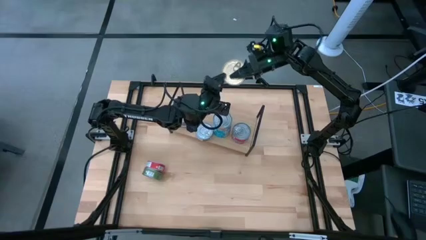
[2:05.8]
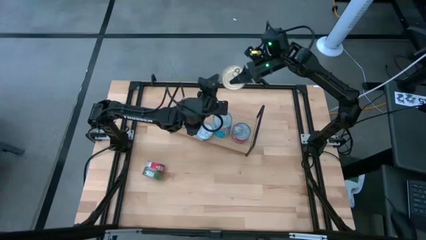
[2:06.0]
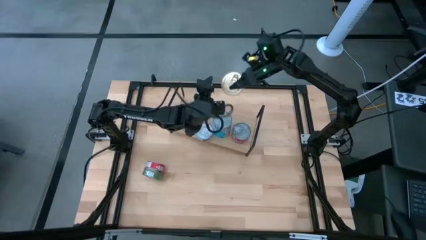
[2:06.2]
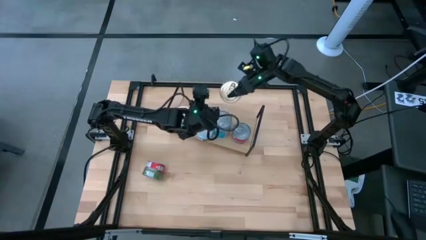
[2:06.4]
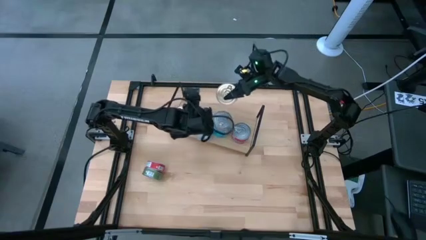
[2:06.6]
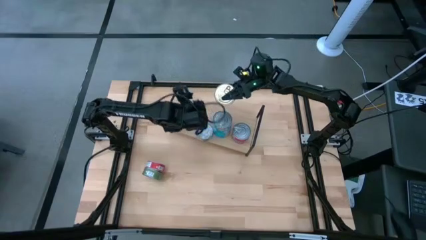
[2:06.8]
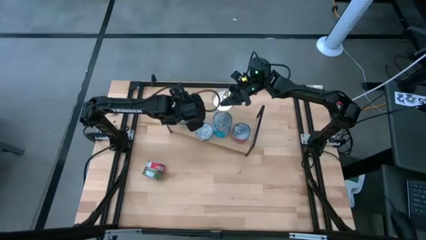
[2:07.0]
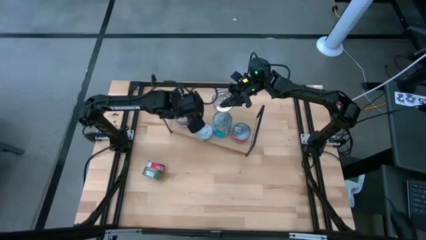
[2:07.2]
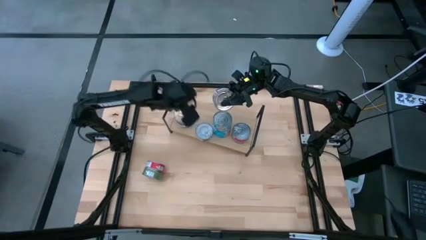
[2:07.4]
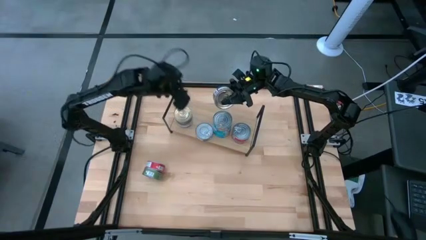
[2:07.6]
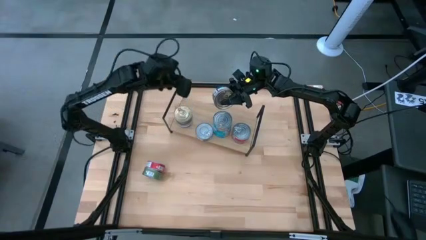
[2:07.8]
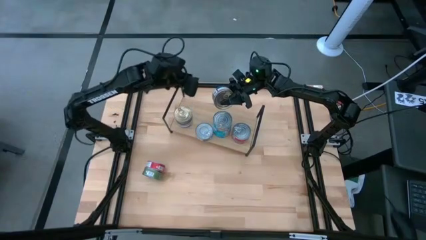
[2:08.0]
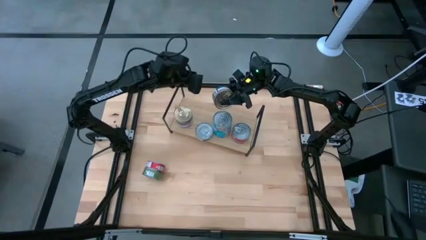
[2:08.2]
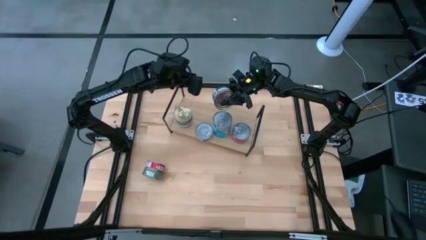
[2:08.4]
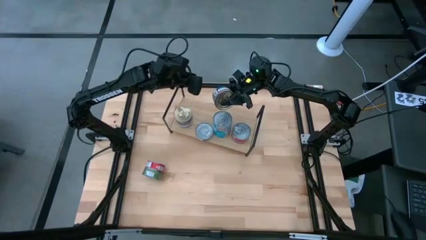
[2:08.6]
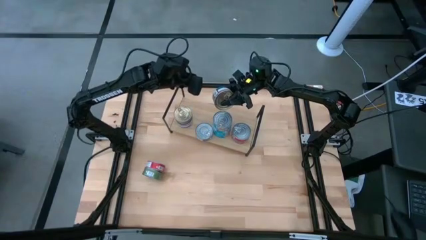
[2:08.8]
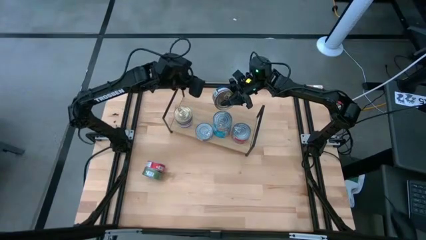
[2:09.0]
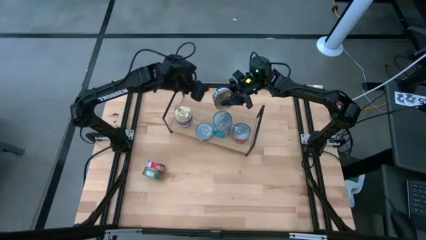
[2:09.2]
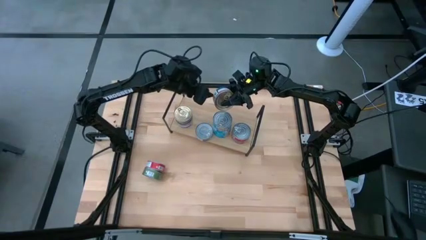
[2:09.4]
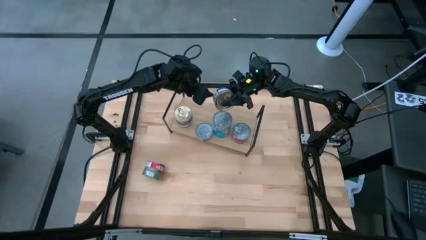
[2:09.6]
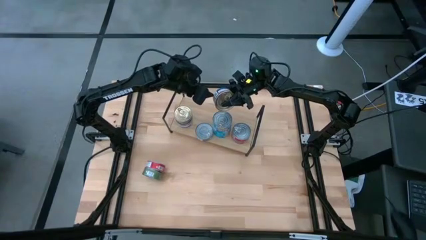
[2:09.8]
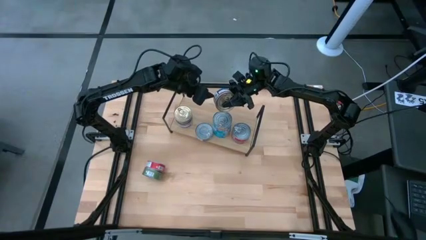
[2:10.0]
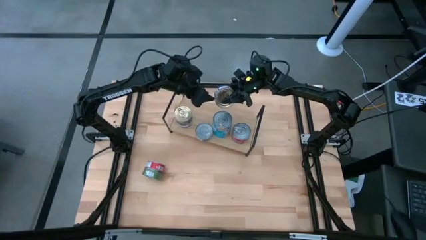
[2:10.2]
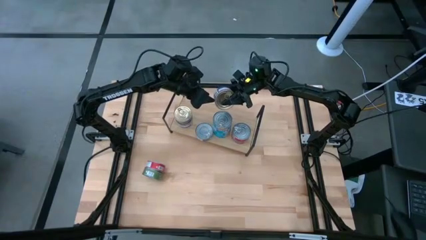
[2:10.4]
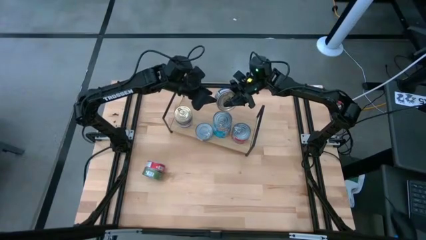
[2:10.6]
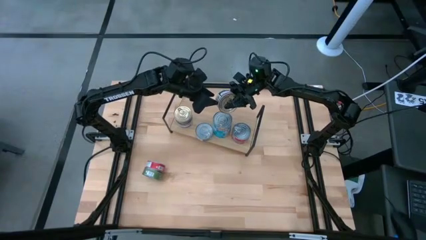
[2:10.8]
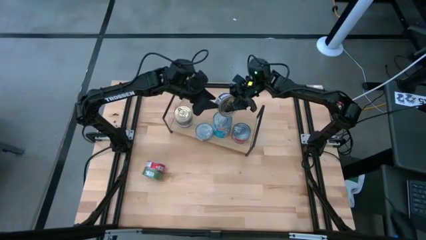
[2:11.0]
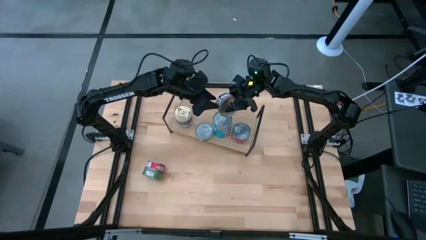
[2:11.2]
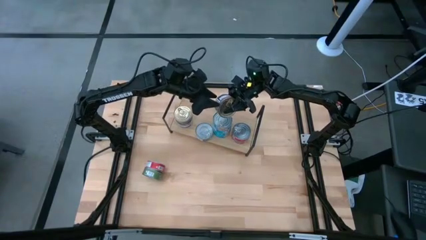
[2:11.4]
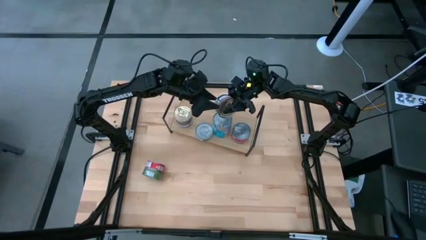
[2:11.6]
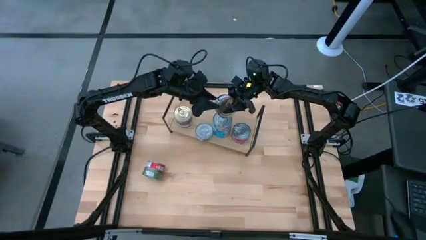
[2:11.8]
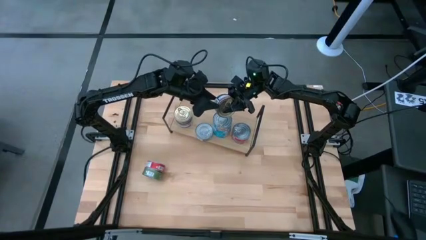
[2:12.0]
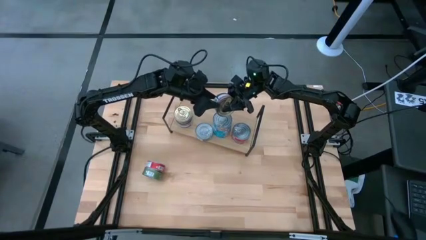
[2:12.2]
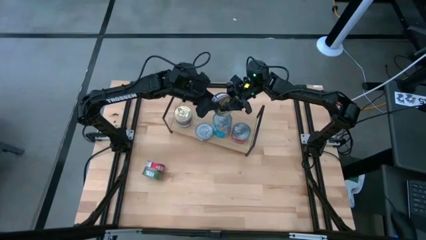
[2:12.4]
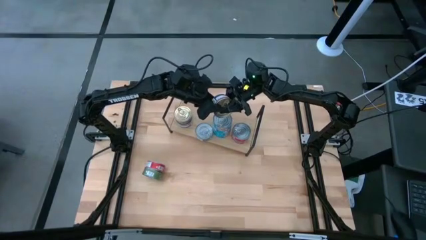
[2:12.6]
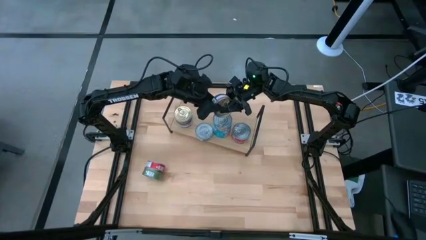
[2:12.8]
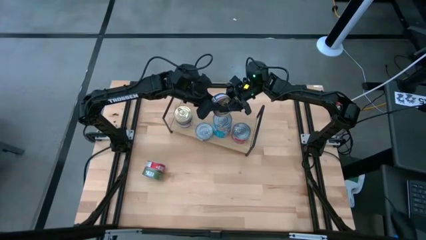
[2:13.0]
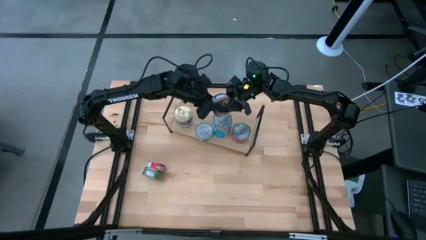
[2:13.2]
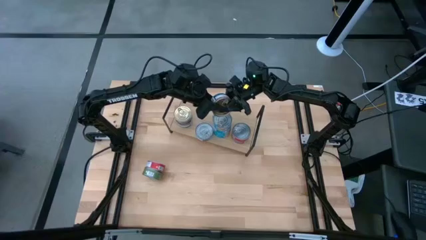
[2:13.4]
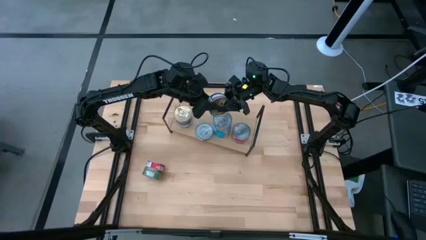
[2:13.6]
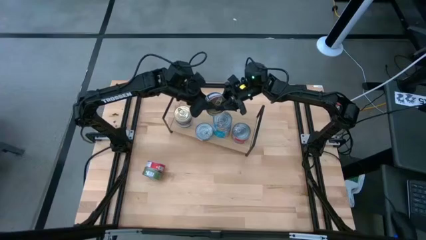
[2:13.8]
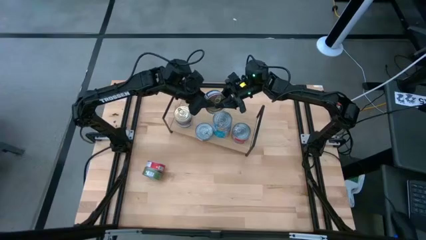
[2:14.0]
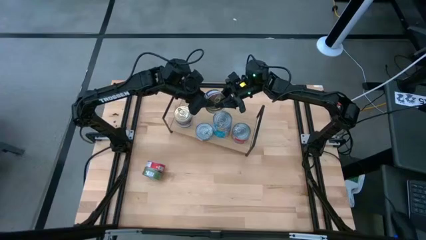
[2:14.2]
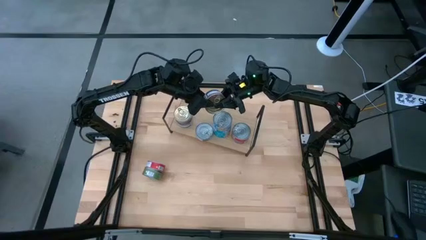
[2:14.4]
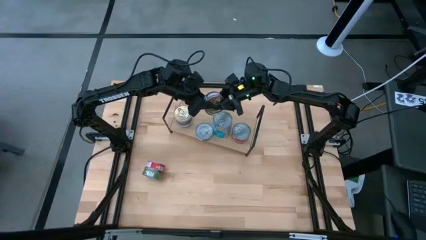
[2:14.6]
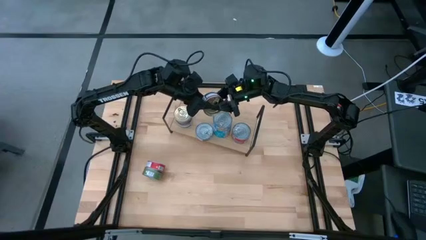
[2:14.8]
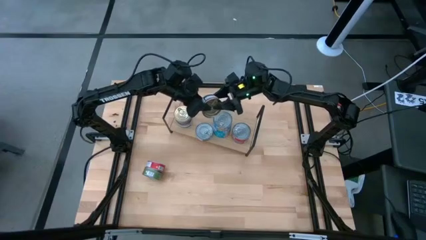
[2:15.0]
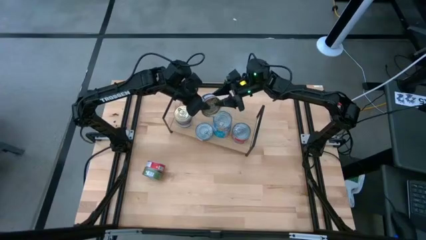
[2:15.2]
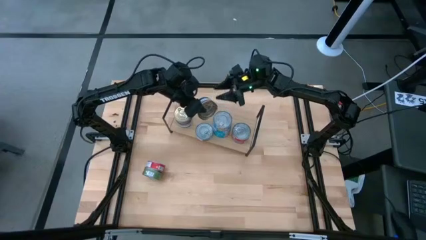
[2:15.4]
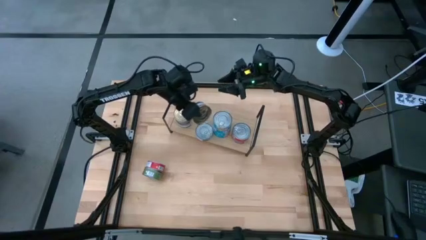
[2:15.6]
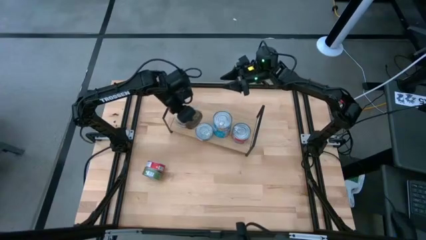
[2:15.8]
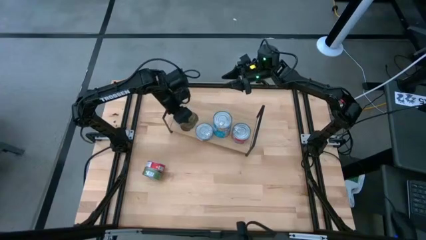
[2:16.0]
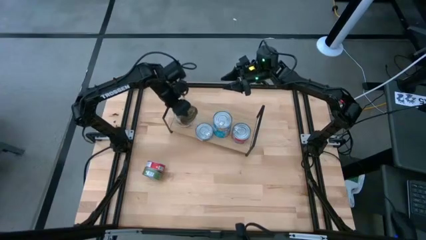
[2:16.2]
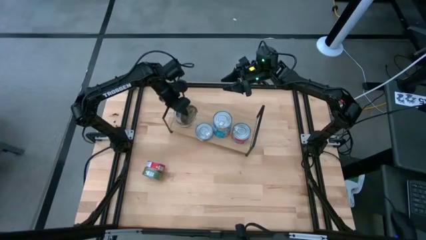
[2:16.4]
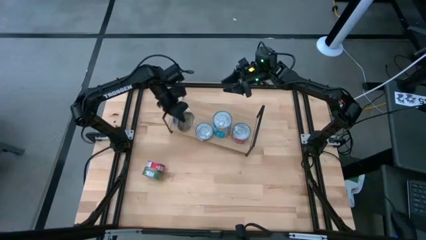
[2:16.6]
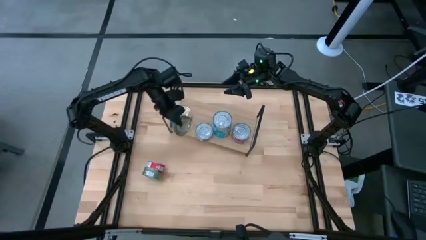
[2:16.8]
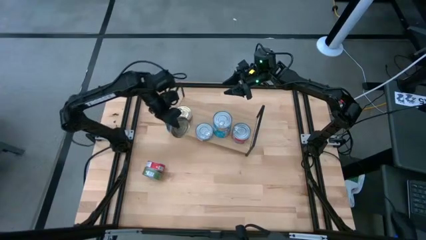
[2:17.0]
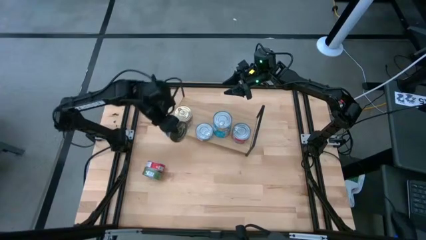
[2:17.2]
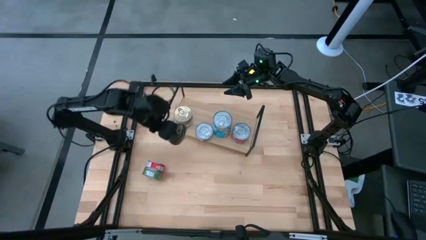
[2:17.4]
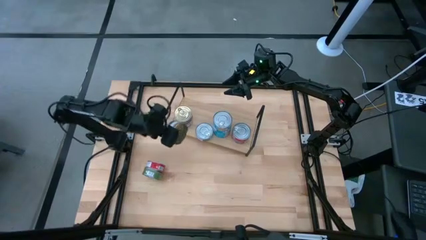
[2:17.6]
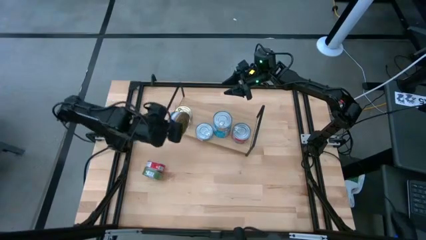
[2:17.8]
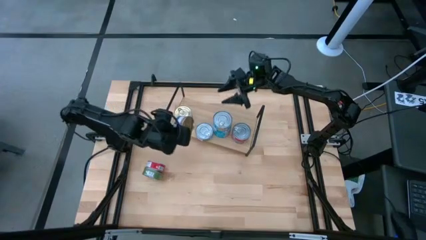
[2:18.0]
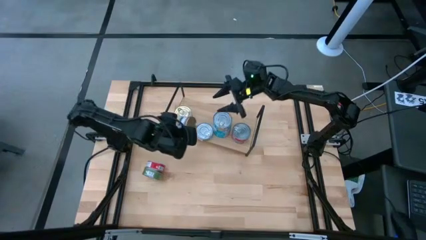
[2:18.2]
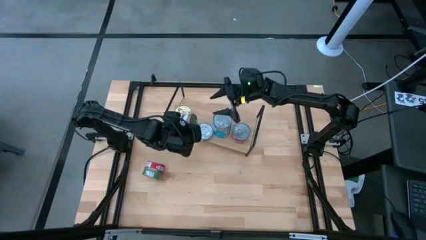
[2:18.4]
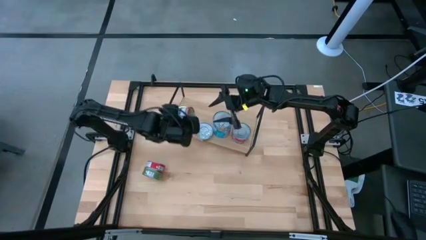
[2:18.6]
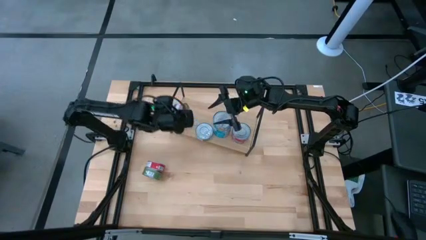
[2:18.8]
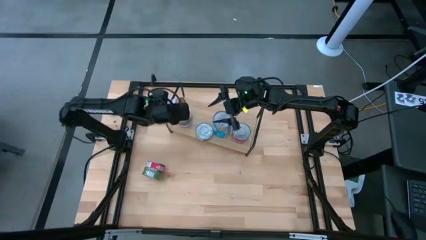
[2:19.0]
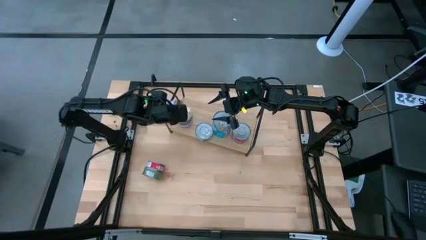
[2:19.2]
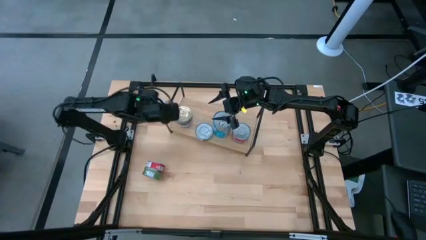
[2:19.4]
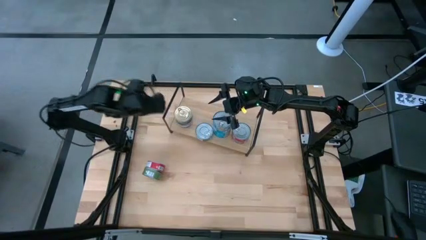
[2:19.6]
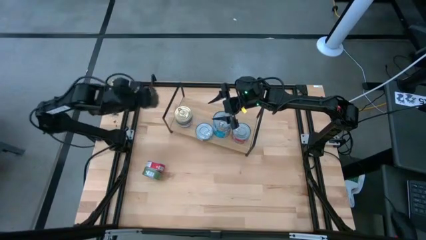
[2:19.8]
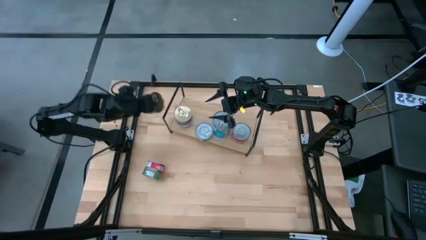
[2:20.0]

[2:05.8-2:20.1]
Task: Stack canned seafood by type on shelf
Stack the blue-pink tuna can on top of the blue-pink tuna can on the shelf

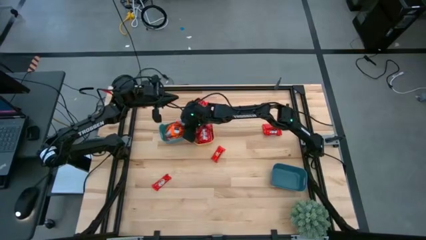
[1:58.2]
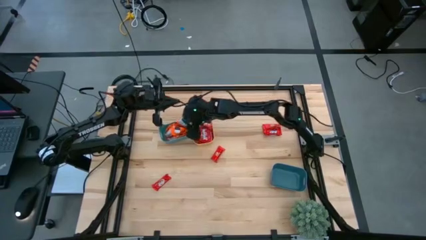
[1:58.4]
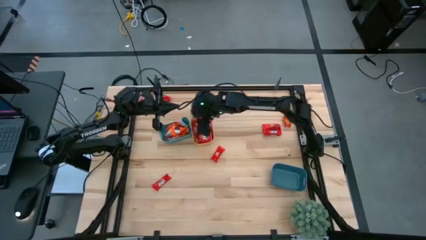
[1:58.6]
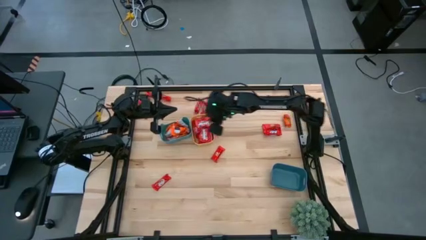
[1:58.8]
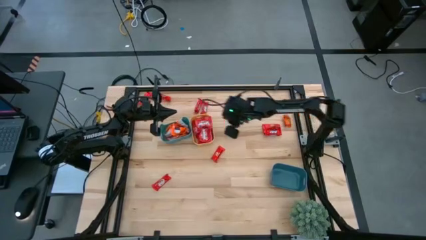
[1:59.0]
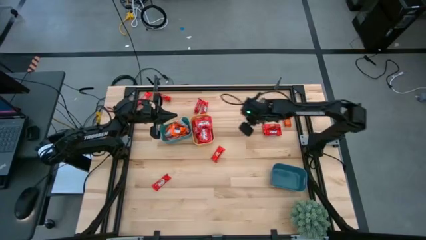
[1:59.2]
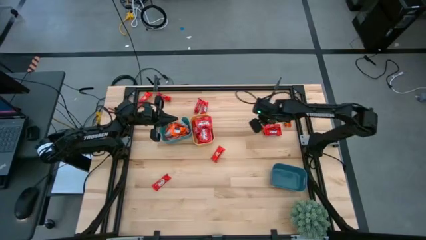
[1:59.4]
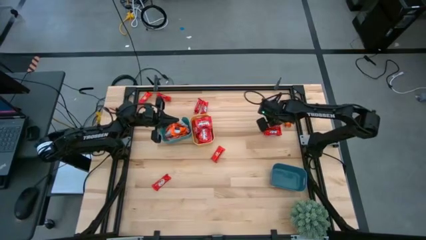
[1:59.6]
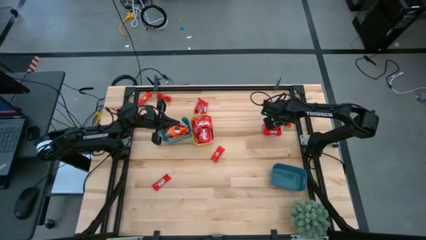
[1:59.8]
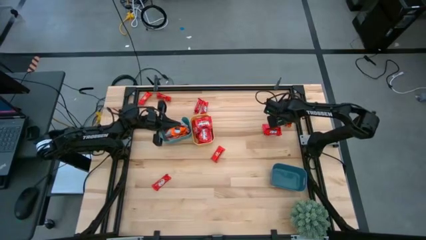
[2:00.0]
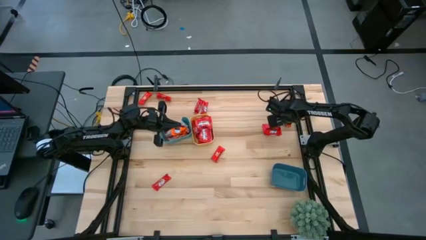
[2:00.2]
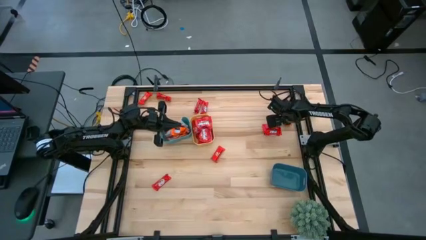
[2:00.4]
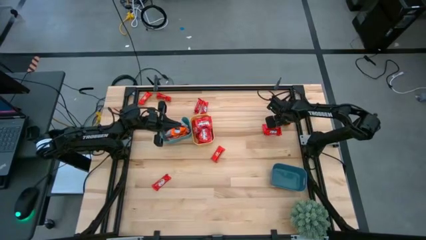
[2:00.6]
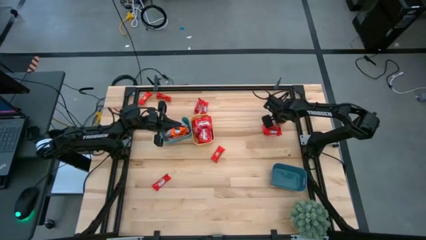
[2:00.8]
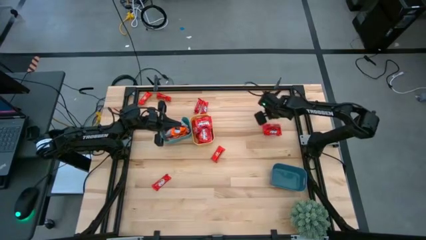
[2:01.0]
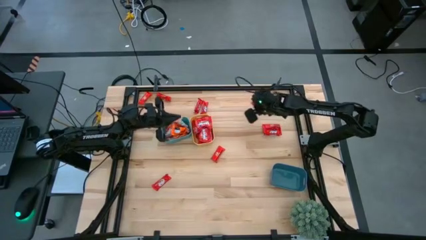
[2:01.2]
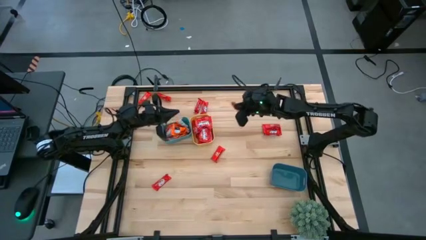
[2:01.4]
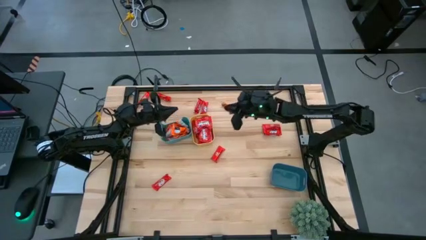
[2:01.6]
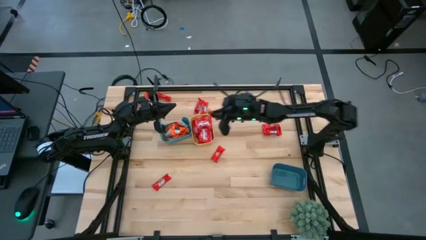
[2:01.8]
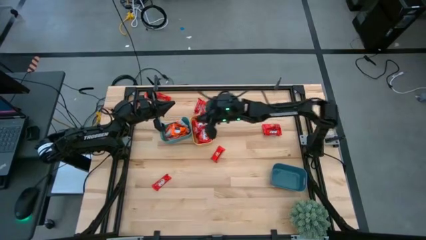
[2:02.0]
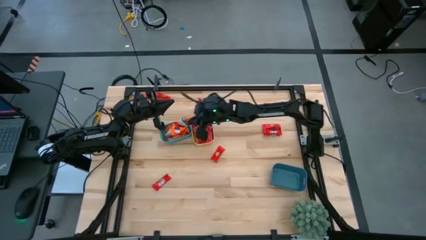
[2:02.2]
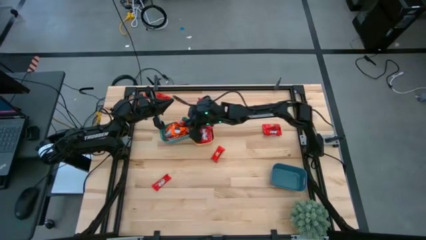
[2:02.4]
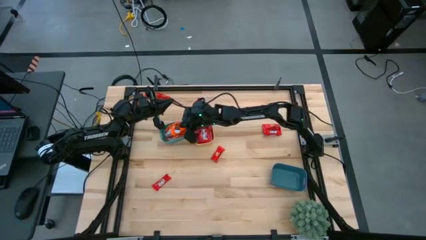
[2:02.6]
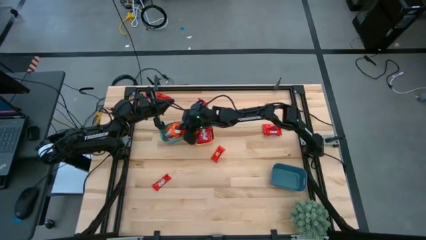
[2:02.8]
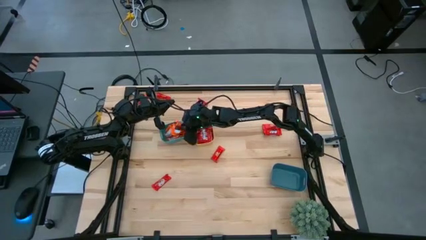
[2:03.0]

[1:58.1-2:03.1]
Task: Sort candy
Put the orange candy into the green bin
